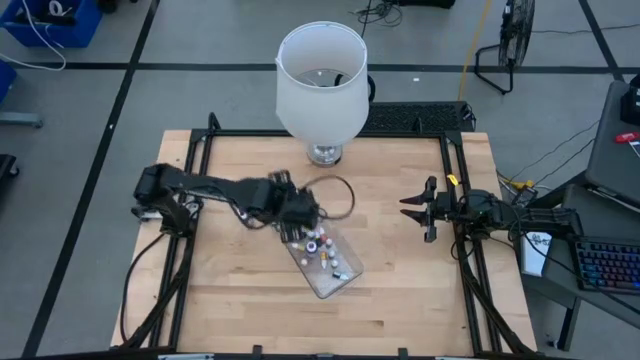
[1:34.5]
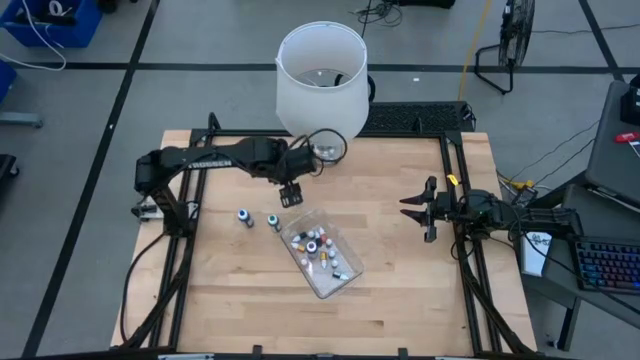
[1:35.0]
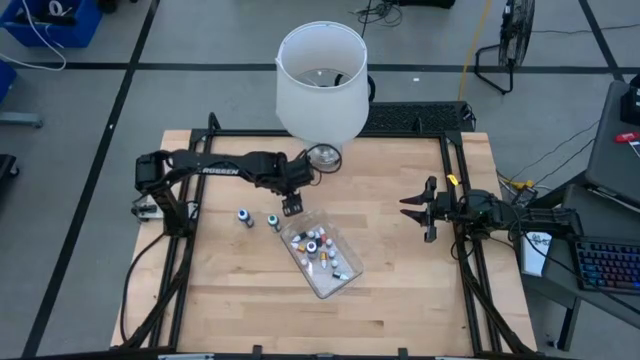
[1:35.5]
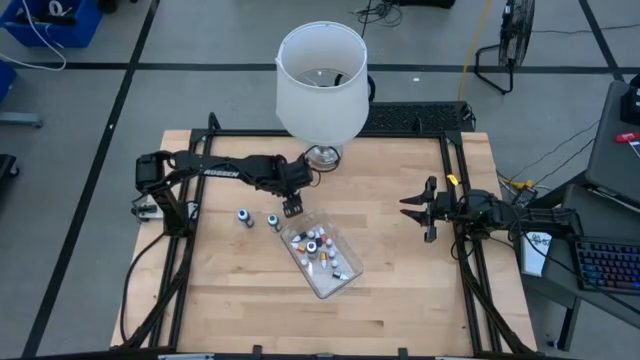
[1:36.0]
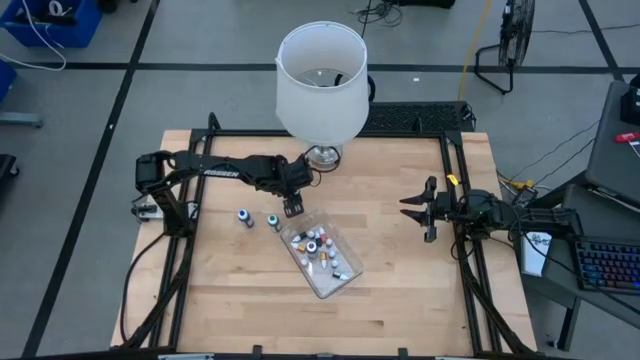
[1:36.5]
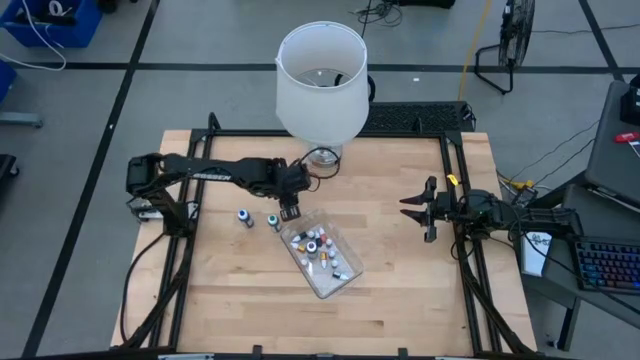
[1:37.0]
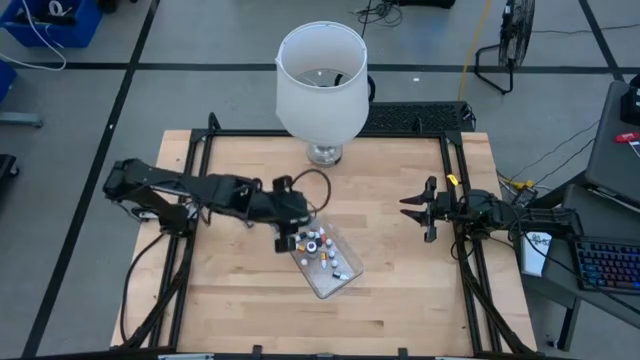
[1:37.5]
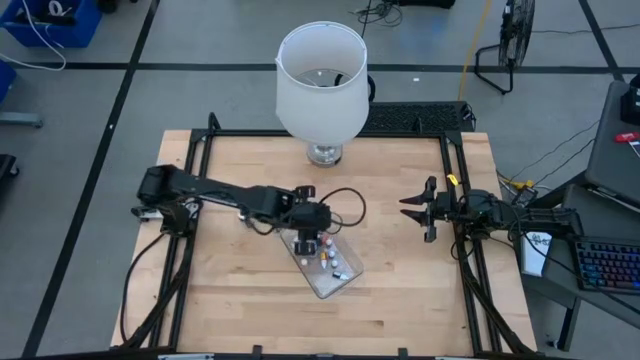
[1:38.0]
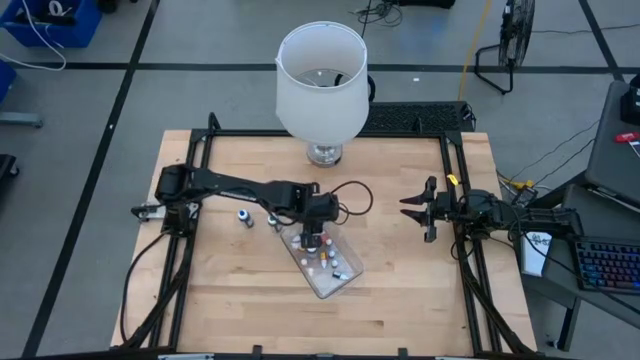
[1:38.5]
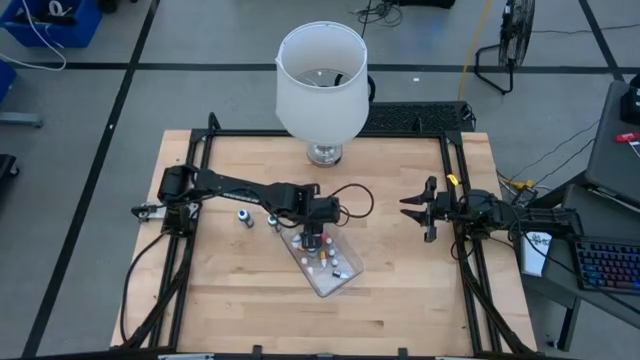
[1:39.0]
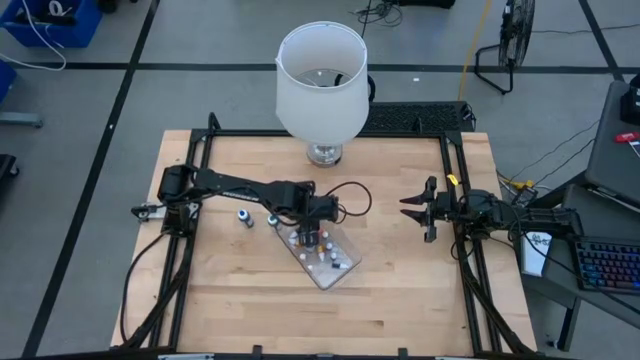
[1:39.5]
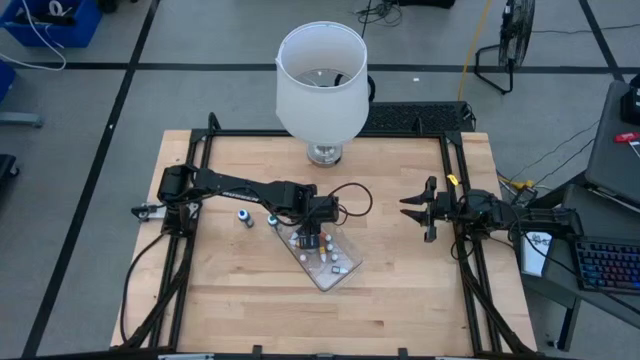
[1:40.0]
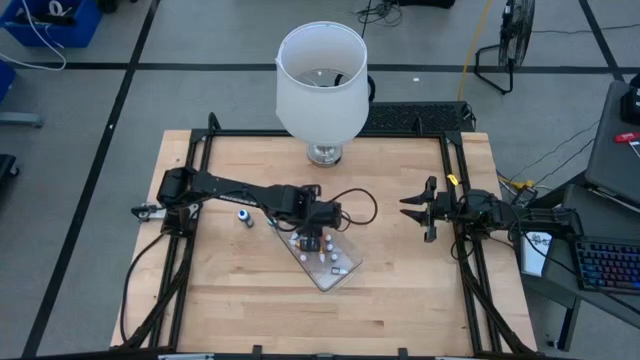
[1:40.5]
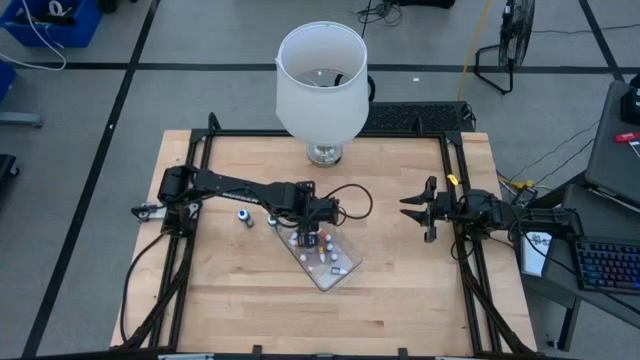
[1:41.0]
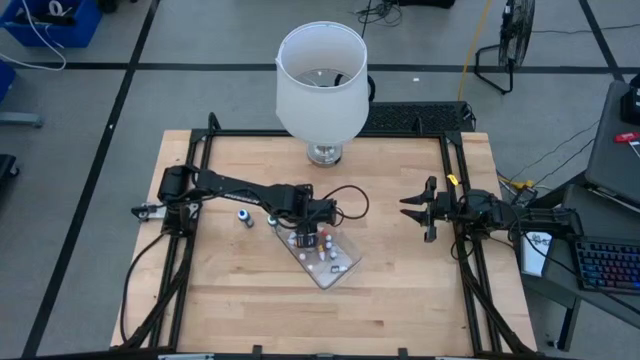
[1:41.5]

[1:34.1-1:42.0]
Task: Pick & Place food coloring
Put the black food coloring bottle into the bin

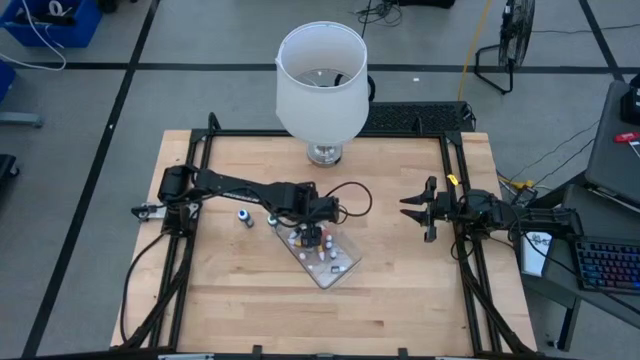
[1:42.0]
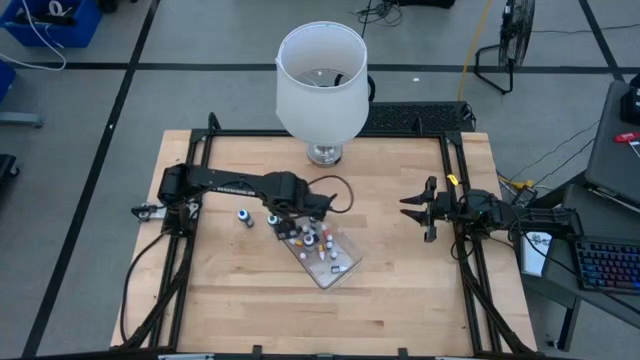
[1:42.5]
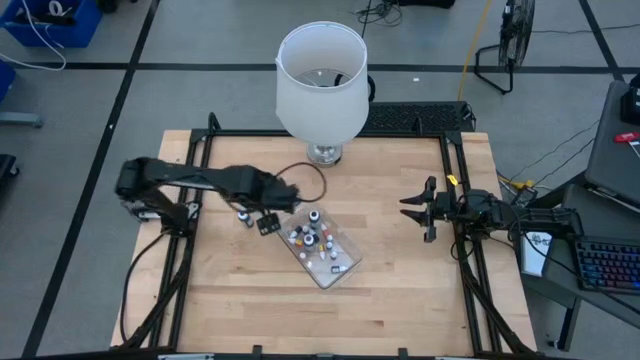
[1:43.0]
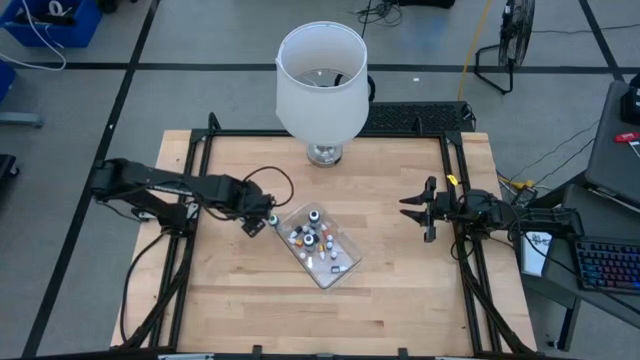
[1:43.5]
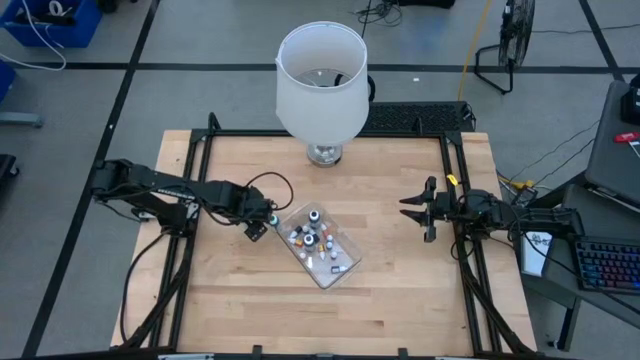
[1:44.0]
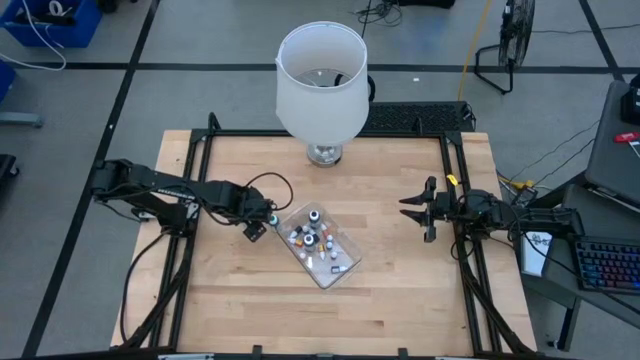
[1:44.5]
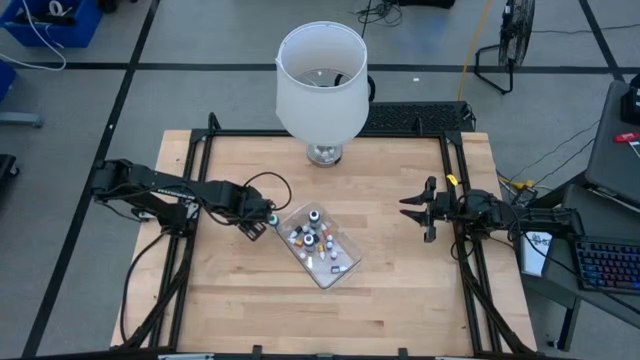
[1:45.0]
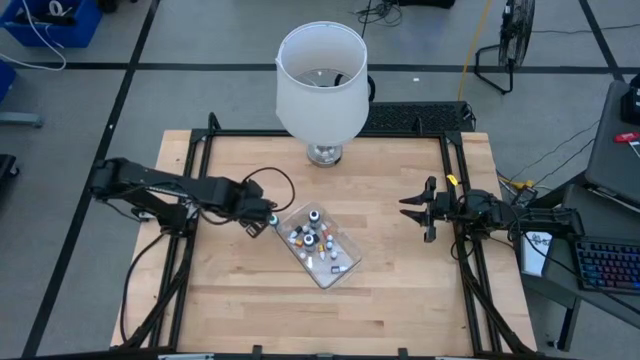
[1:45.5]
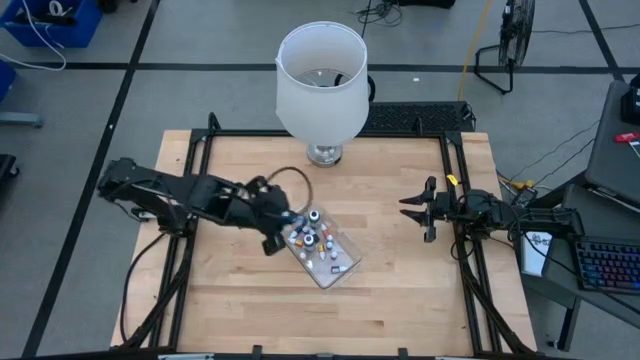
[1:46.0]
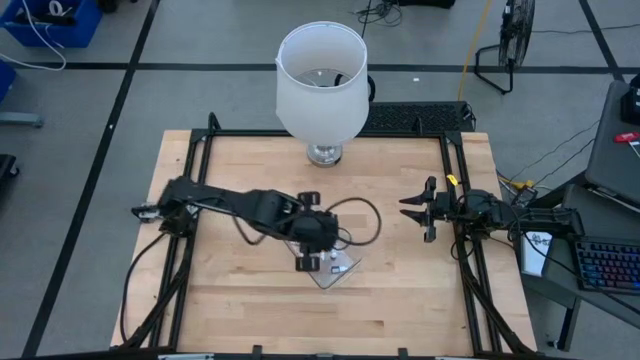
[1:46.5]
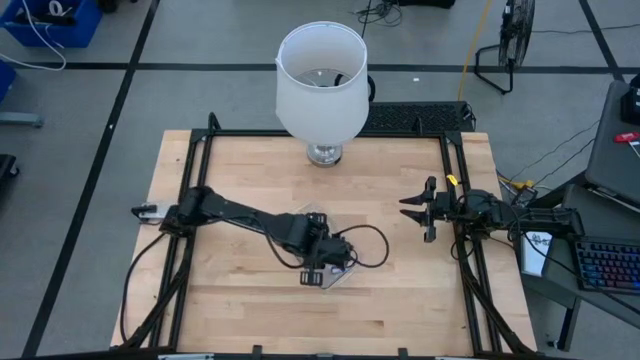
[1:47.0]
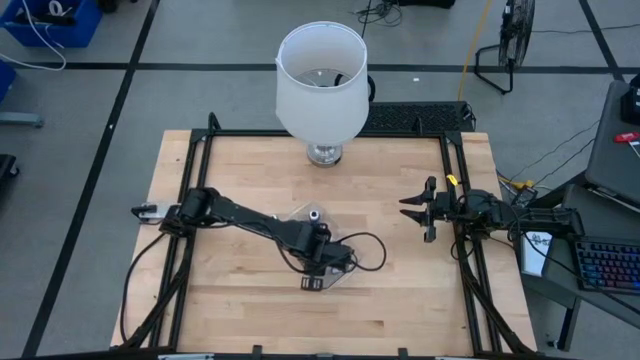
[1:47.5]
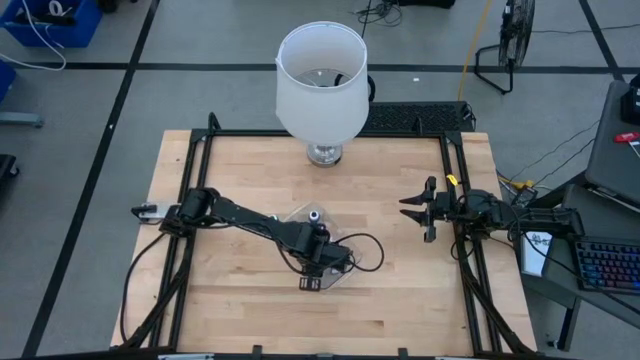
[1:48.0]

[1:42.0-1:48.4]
Put the blue food coloring bottle into the bin

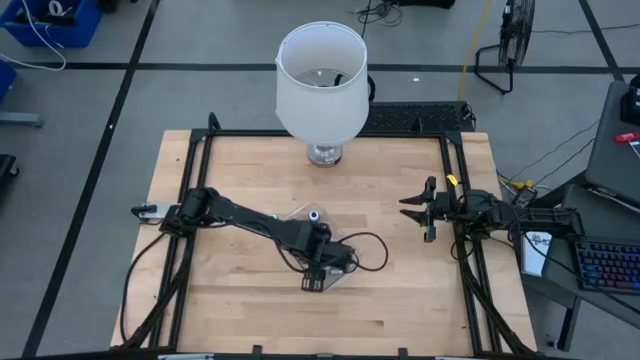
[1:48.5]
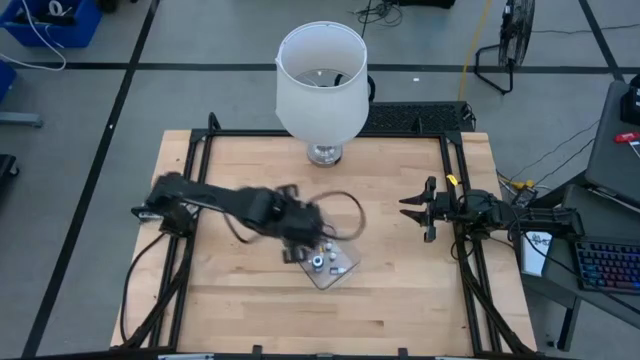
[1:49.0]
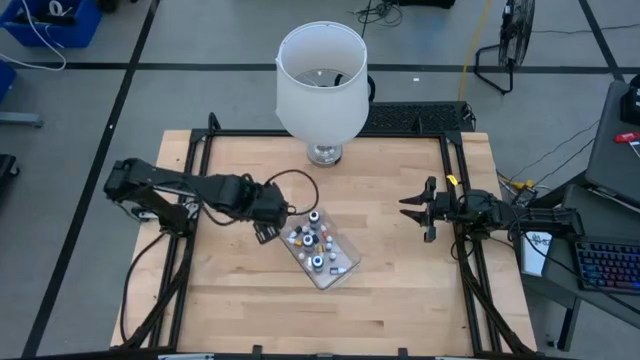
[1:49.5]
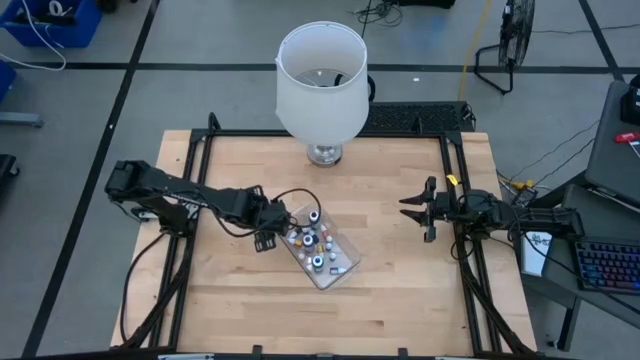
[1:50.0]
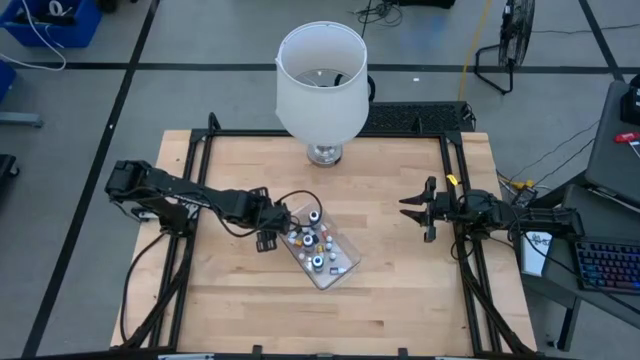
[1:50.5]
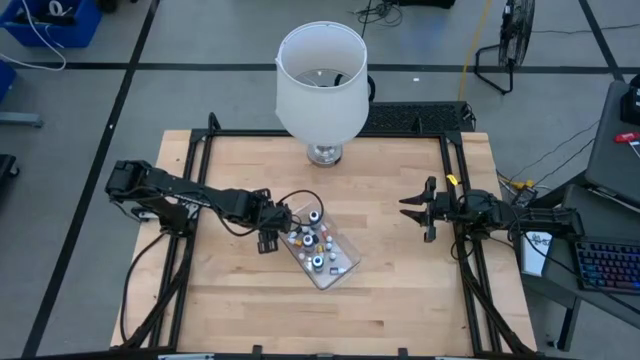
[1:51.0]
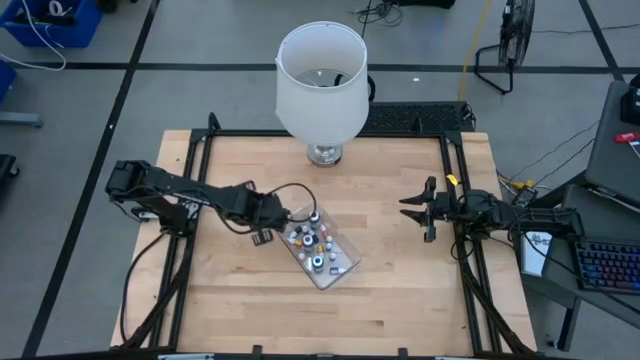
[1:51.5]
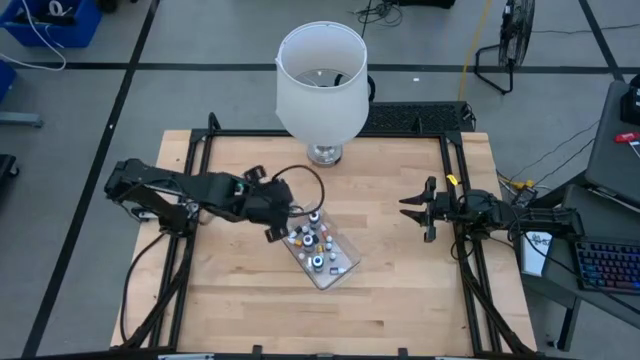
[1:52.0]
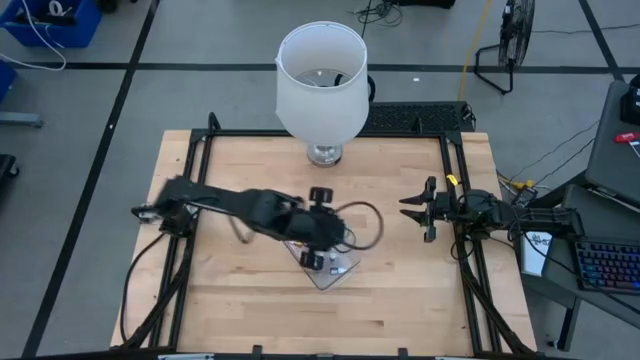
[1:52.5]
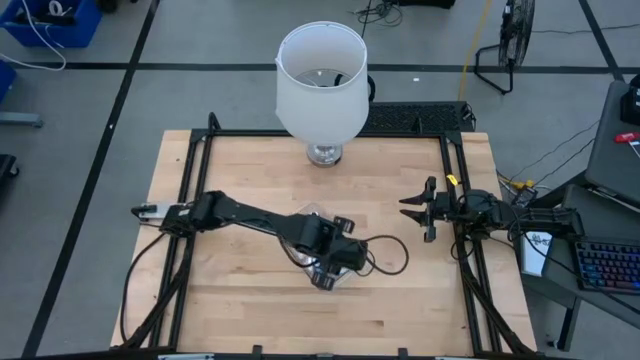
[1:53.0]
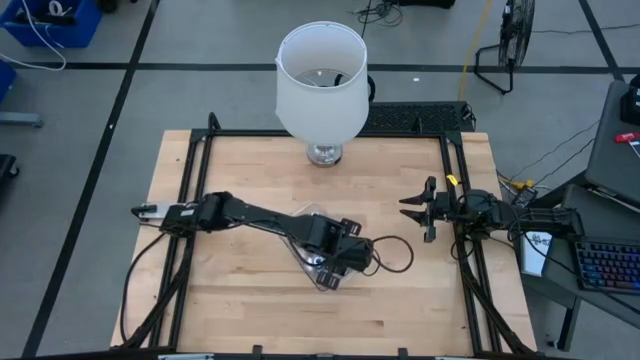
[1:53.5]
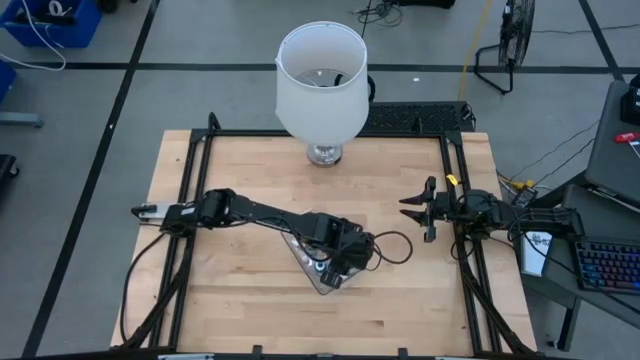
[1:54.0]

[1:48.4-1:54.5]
Put the green food coloring bottle into the bin

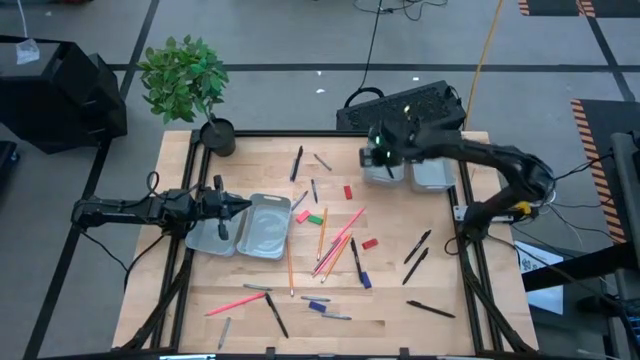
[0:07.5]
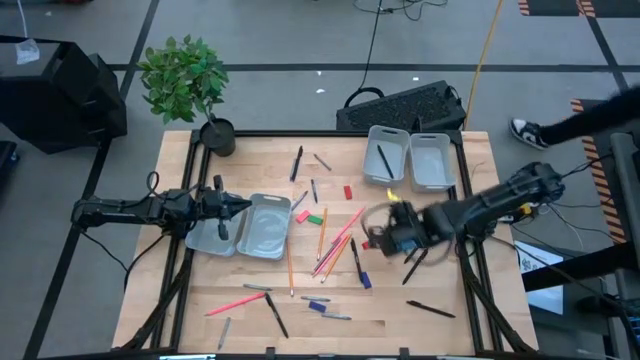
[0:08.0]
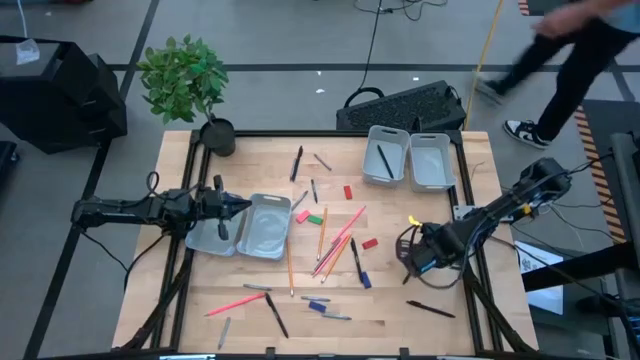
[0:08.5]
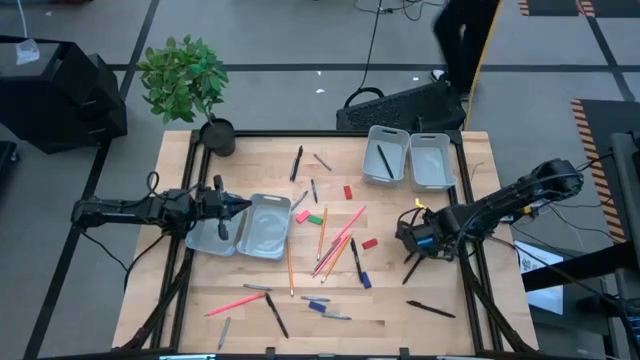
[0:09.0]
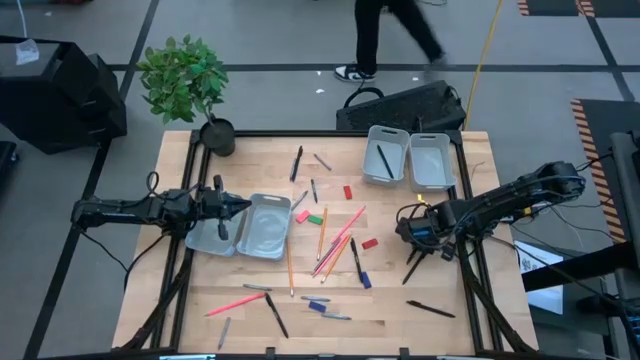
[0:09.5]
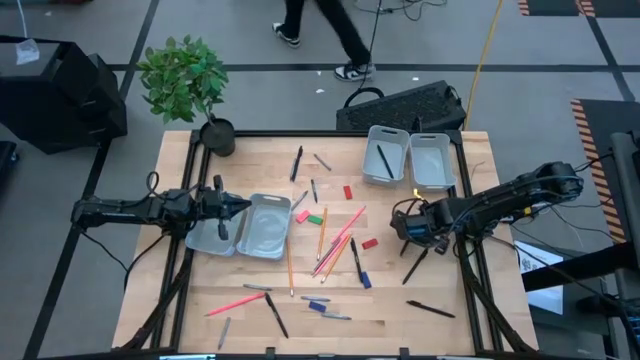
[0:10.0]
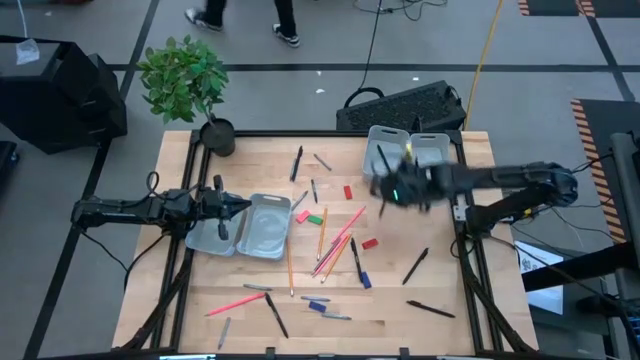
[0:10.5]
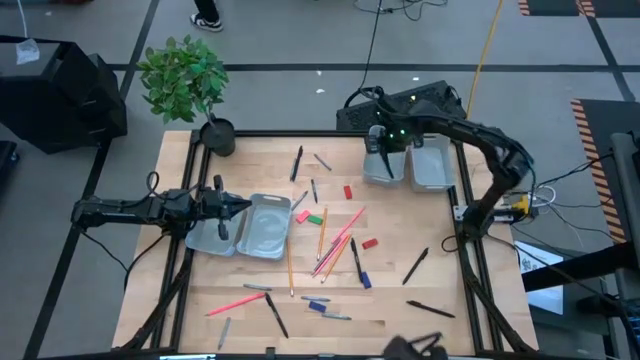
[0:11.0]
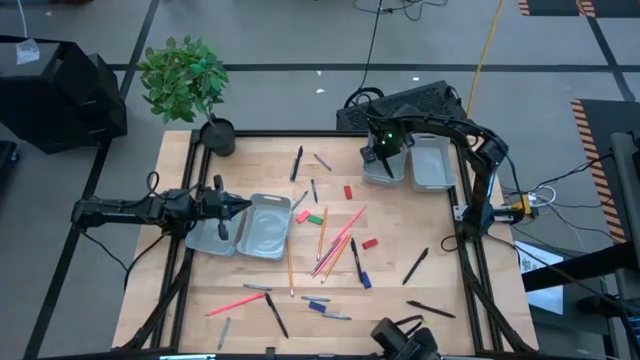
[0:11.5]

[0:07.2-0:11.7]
Task: Sort crayons/erasers/pens/pencils in bins
Put the black pen into the top left gray bin
